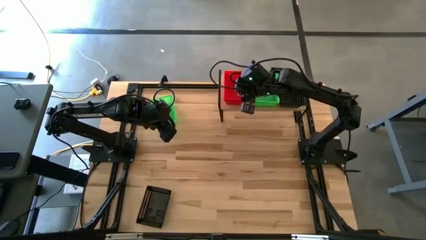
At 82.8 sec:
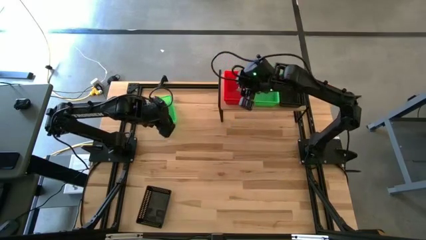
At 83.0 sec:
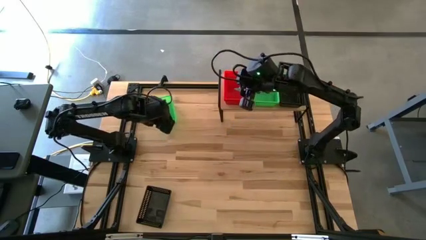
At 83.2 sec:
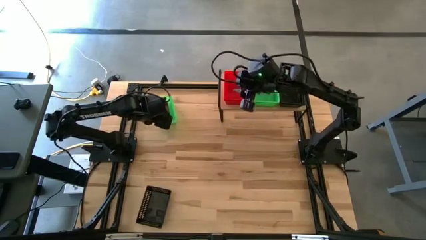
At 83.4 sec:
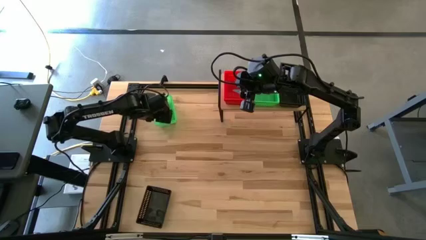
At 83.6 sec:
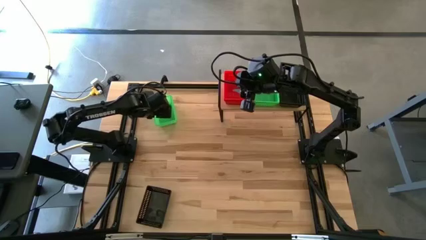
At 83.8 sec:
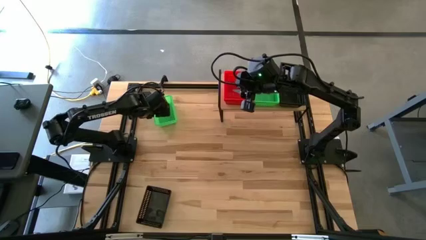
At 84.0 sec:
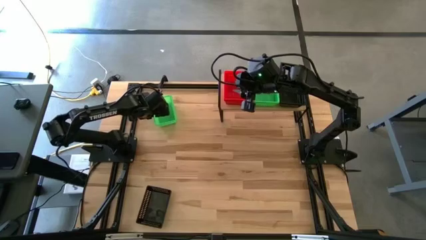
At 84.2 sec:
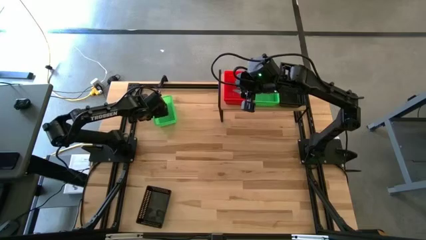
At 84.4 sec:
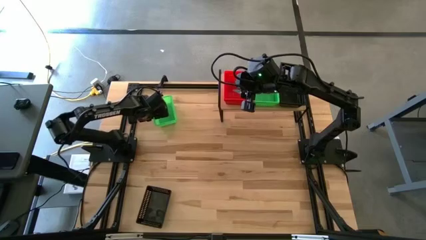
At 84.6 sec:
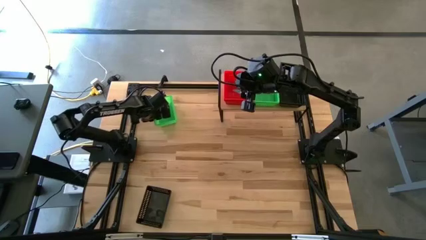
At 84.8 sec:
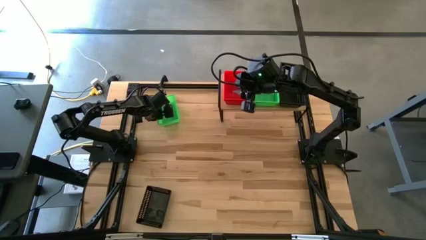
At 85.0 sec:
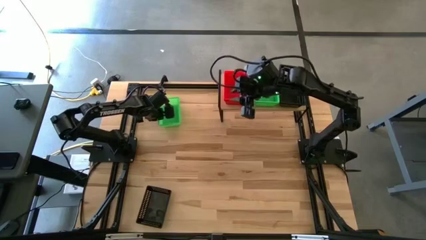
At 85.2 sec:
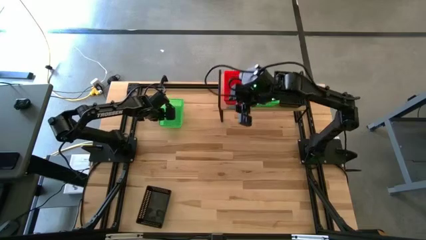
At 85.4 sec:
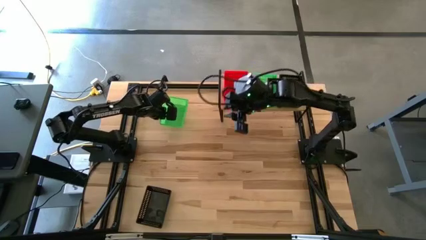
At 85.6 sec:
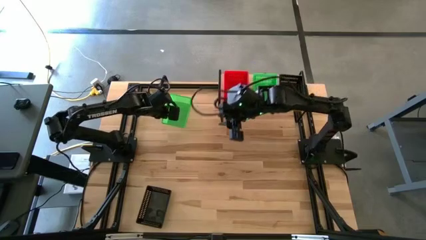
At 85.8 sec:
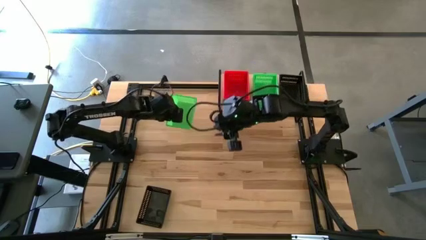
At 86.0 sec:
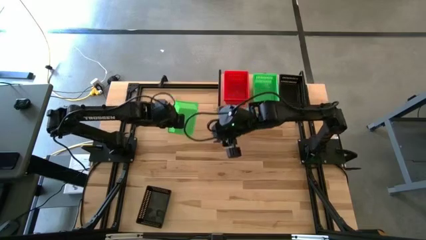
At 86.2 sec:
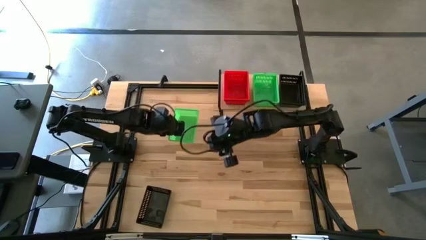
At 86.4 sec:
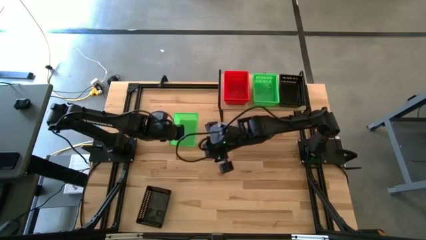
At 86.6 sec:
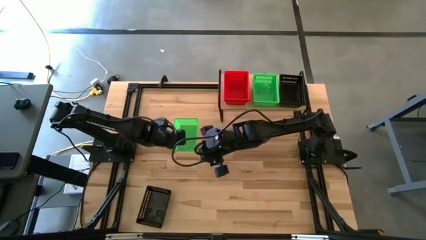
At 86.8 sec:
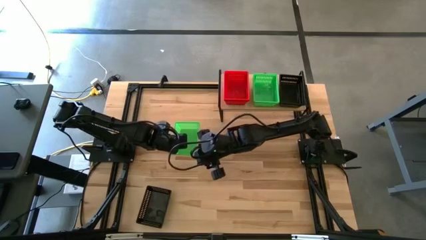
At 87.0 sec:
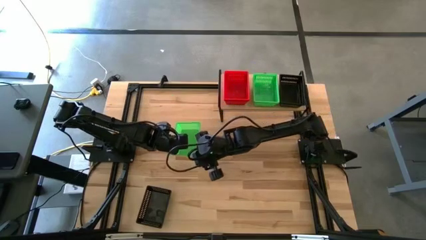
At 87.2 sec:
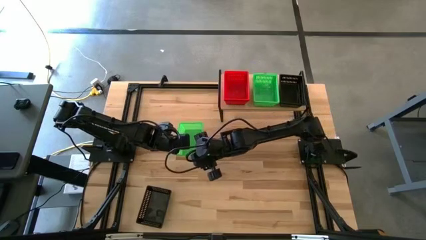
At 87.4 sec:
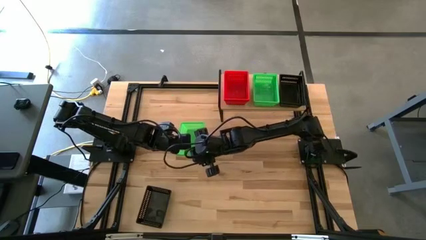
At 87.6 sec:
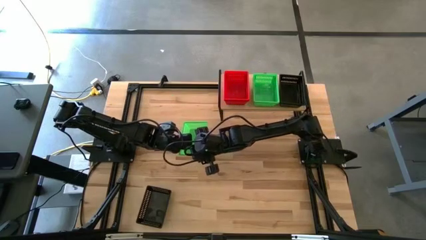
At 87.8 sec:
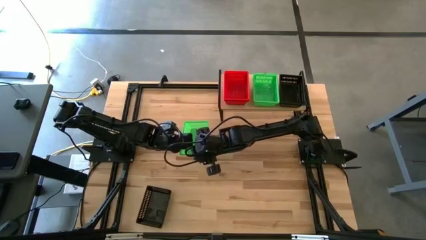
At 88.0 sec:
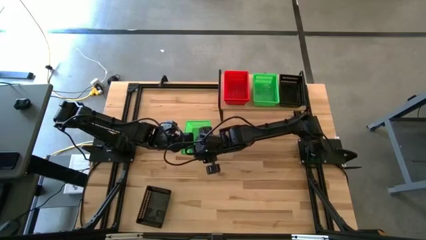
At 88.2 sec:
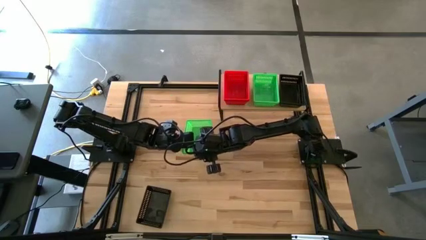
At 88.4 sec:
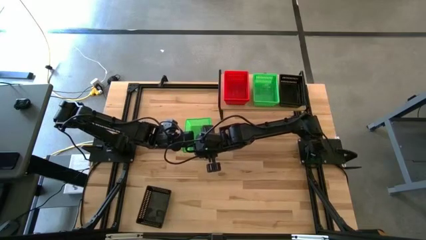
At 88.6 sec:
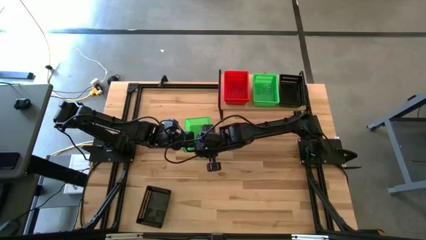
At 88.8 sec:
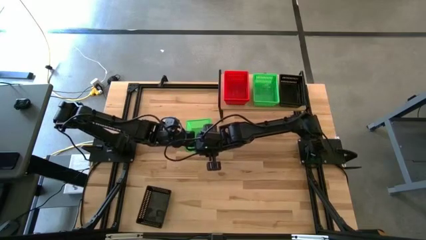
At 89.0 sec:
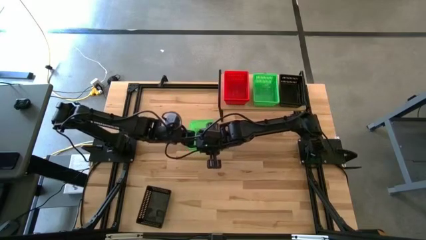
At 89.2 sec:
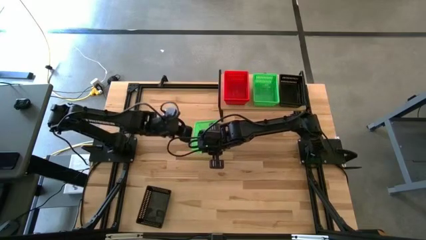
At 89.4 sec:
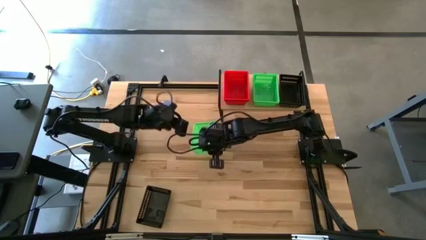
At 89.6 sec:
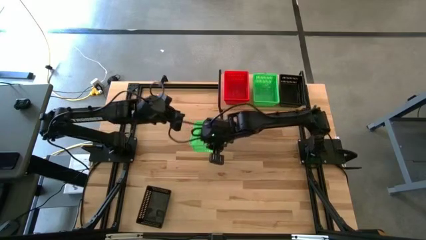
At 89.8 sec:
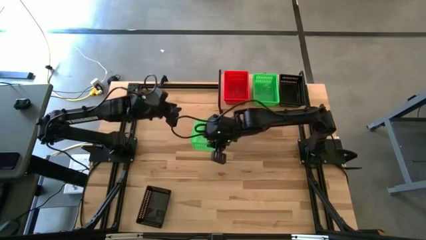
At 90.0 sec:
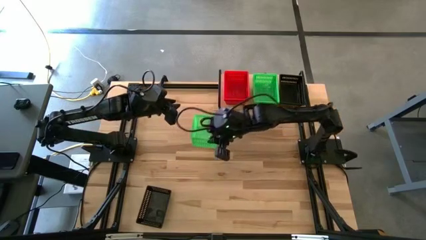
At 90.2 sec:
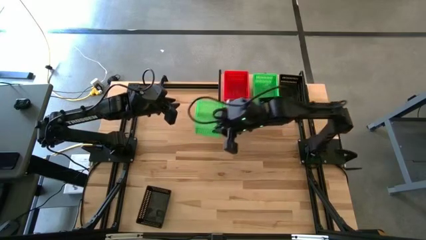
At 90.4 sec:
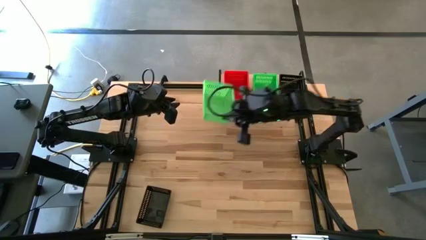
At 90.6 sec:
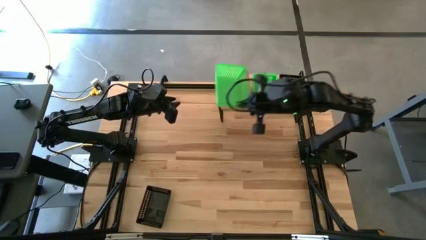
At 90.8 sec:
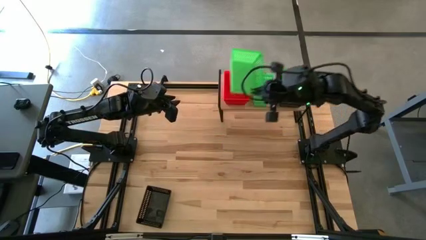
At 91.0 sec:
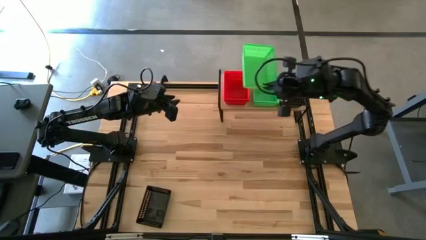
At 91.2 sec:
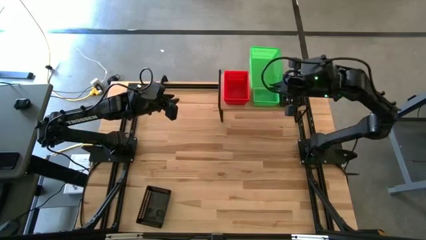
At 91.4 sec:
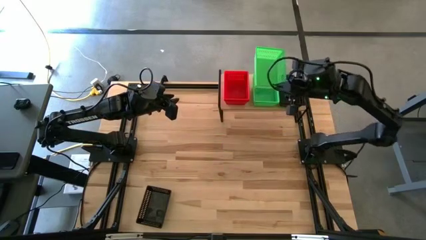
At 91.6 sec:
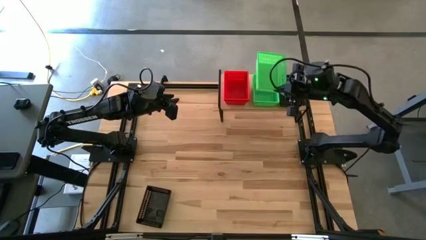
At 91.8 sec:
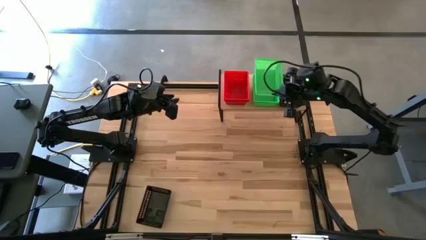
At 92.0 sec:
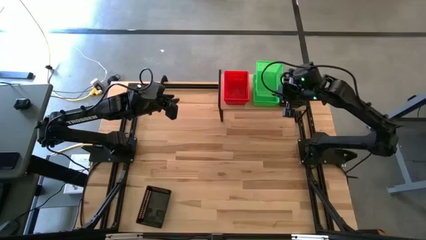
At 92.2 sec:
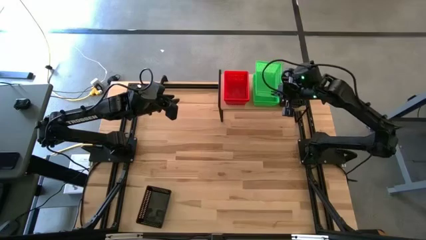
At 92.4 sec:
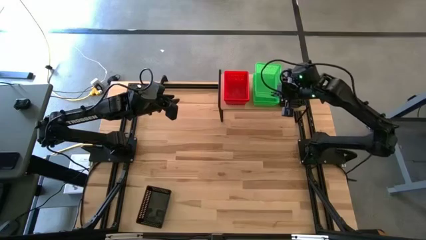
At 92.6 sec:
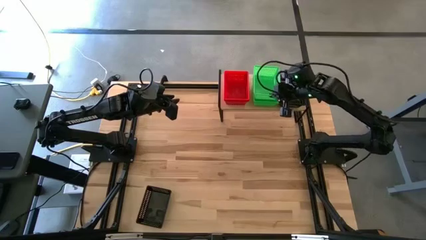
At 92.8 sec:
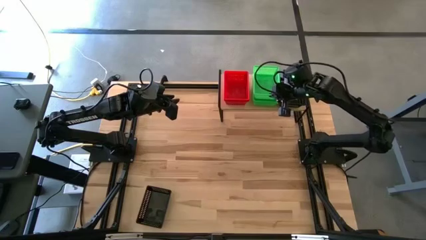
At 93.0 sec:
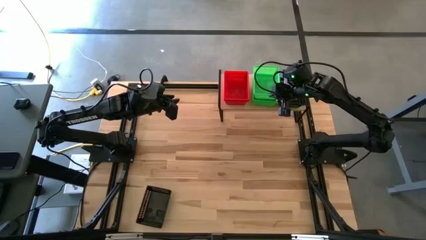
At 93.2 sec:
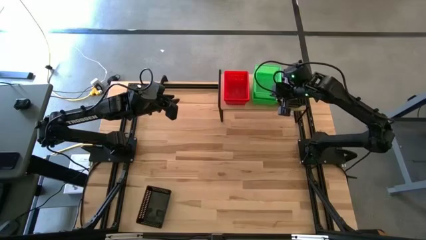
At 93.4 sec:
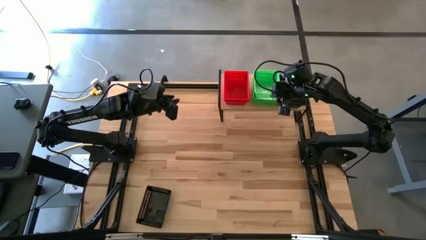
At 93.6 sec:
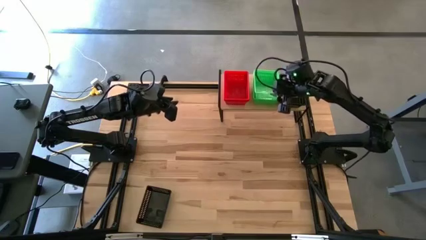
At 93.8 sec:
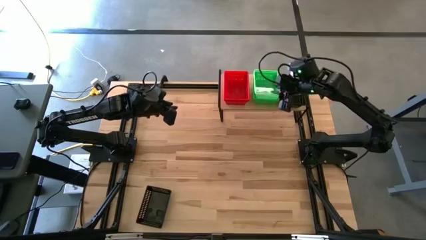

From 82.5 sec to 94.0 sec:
Task: Stack baskets on shelf by color
Stack the green bin on top of the green bin

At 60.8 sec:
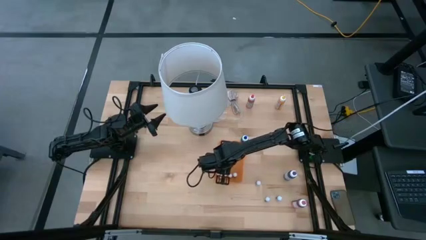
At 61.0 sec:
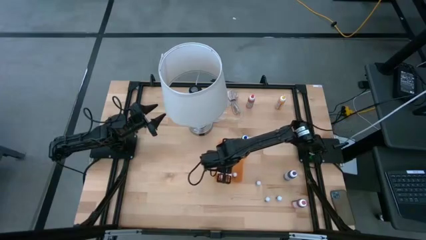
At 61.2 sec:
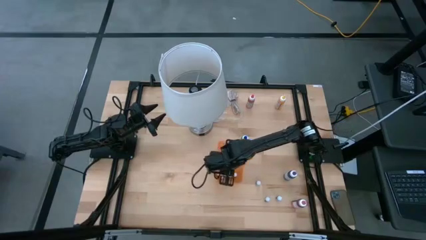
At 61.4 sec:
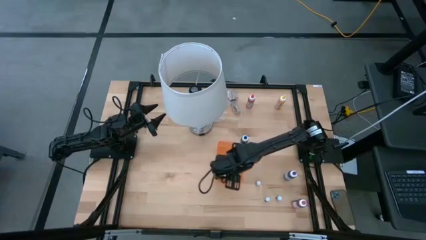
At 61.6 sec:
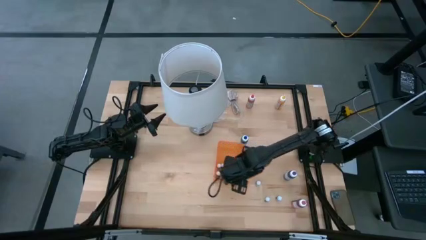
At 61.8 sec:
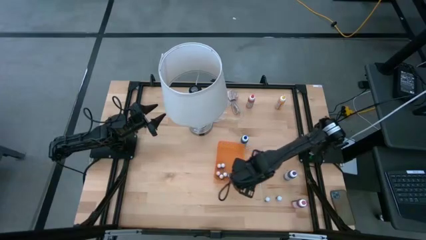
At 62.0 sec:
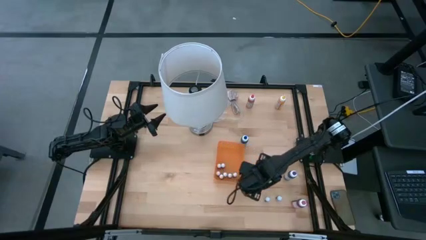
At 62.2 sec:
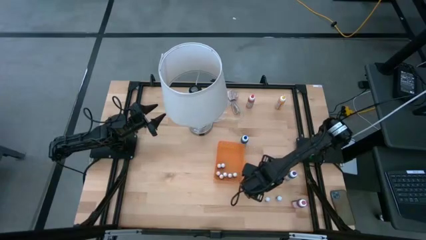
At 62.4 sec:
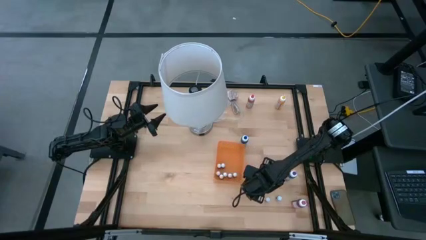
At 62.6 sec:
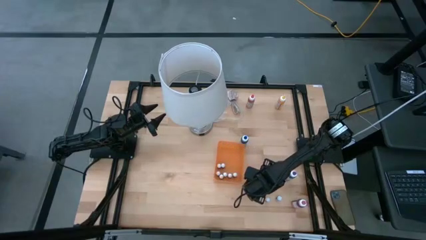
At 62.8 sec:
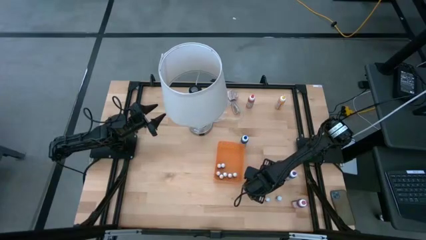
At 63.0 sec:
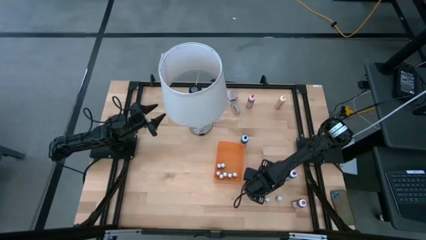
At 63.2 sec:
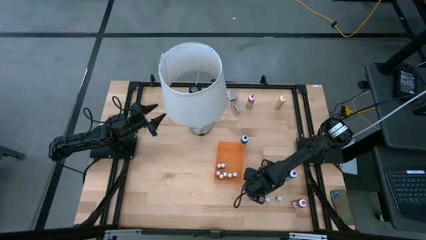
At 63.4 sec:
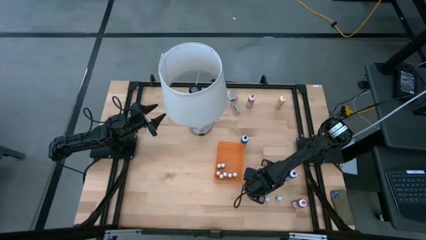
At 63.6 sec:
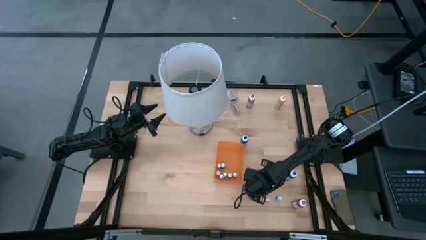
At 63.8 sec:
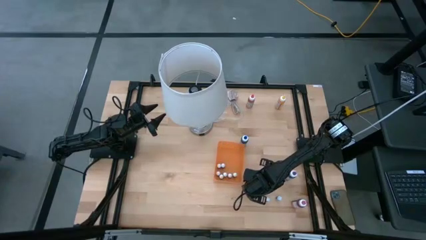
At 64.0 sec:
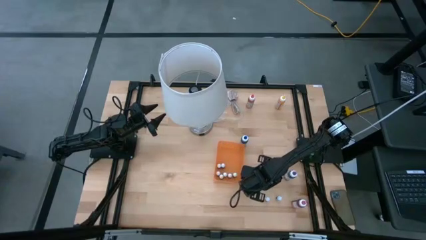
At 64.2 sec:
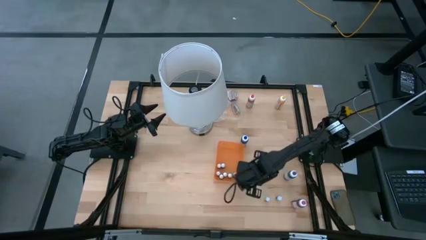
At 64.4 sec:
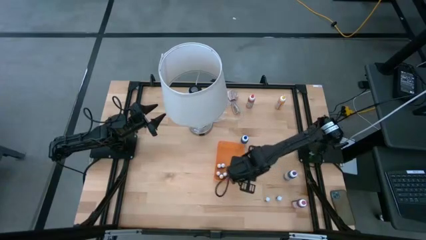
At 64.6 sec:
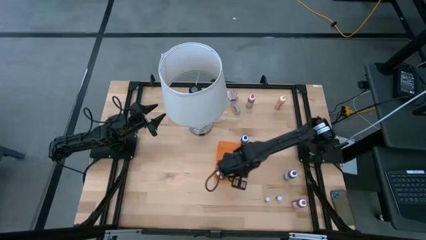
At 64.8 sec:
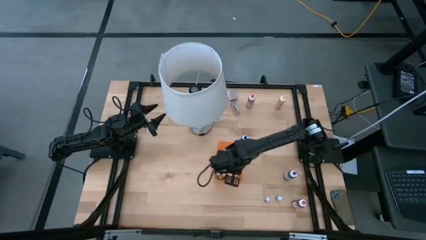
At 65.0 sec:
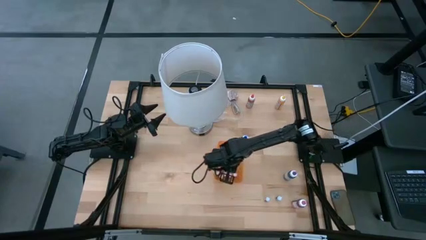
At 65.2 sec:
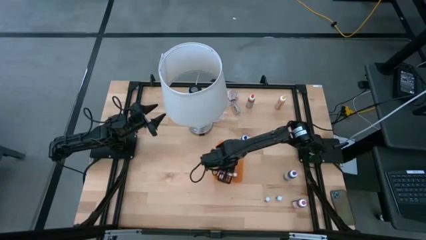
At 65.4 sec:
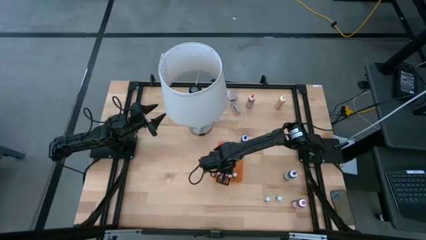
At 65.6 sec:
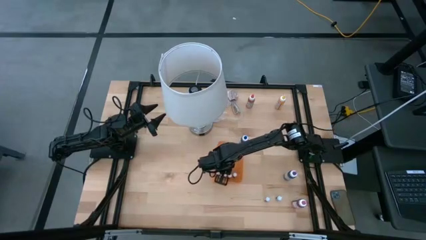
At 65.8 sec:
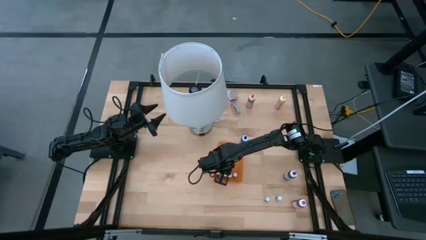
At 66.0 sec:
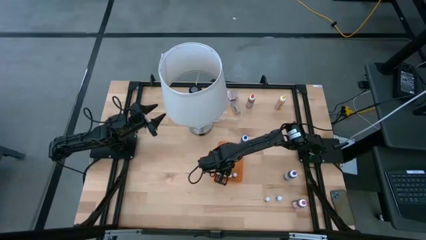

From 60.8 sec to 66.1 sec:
Task: Pick & Place food coloring
Put the small pink food coloring bottle into the orange bin
